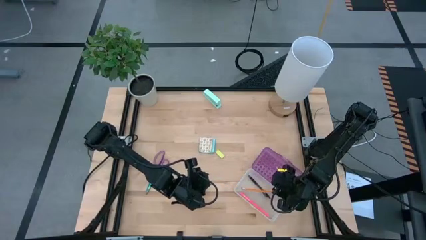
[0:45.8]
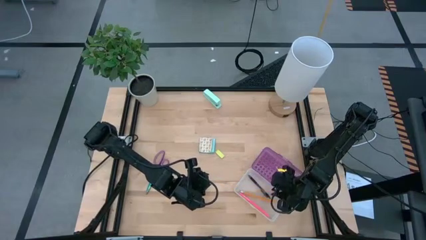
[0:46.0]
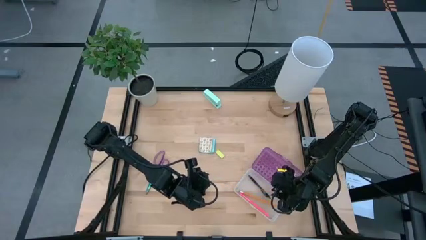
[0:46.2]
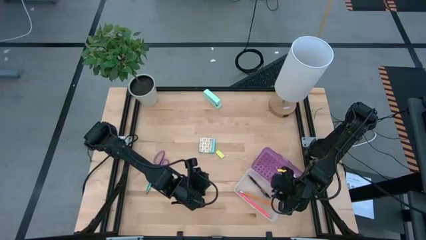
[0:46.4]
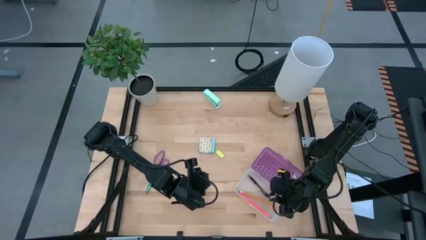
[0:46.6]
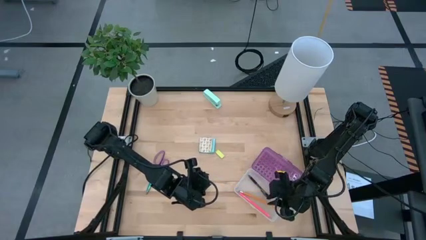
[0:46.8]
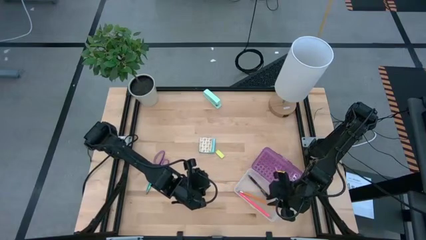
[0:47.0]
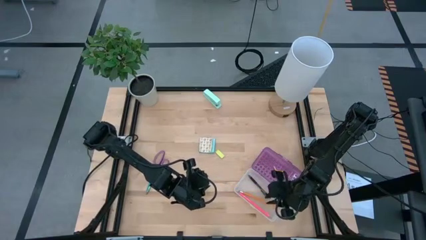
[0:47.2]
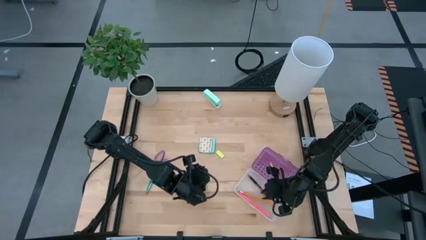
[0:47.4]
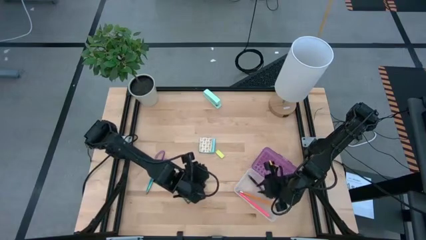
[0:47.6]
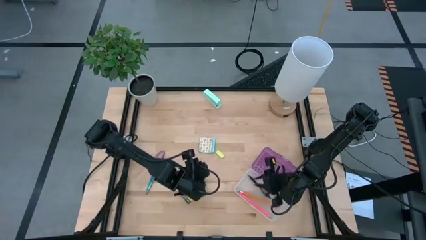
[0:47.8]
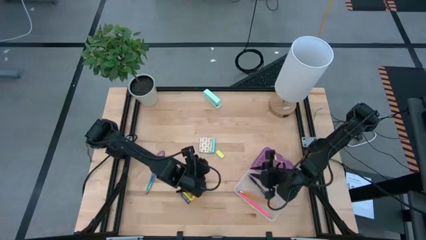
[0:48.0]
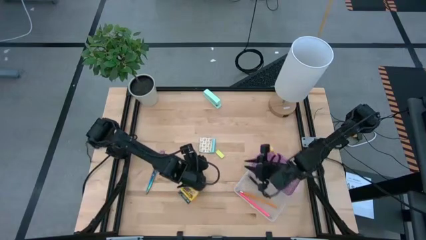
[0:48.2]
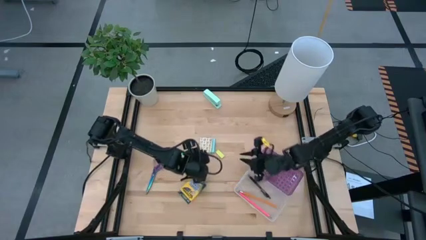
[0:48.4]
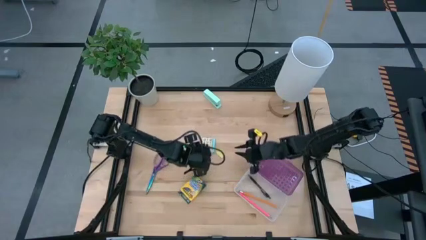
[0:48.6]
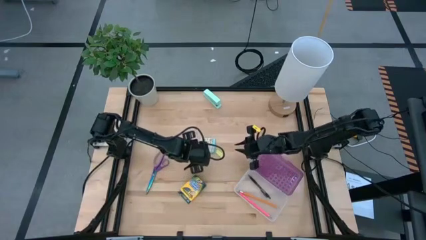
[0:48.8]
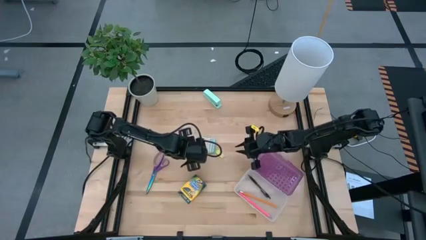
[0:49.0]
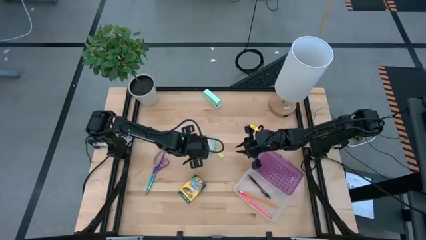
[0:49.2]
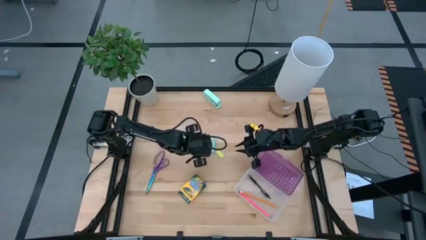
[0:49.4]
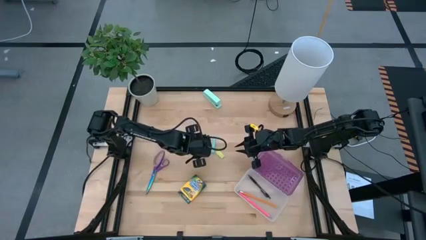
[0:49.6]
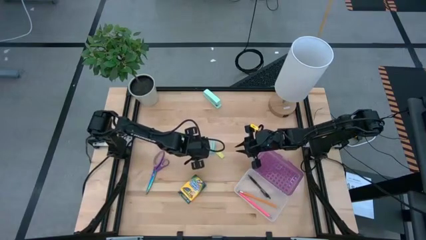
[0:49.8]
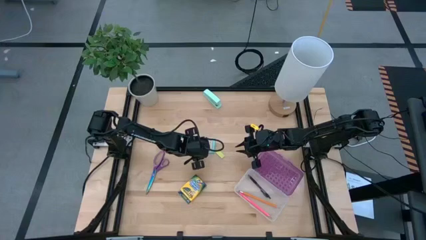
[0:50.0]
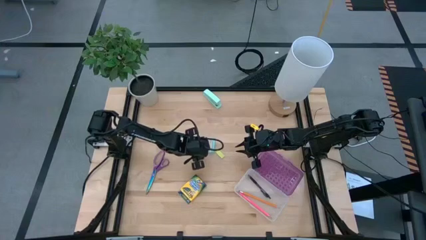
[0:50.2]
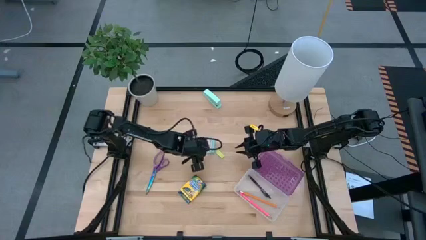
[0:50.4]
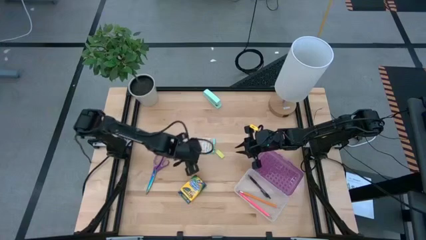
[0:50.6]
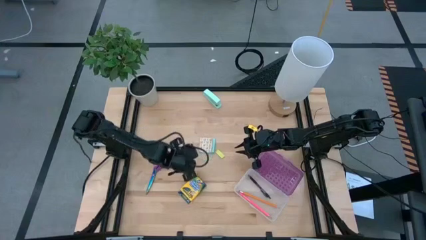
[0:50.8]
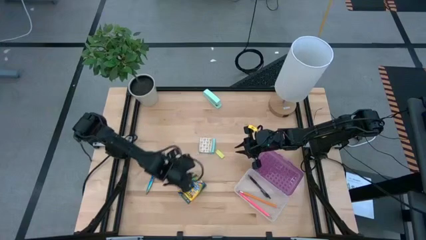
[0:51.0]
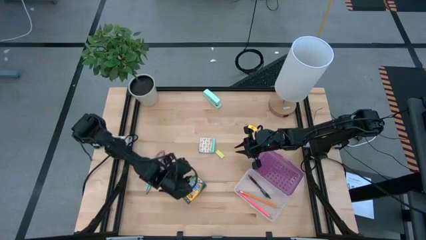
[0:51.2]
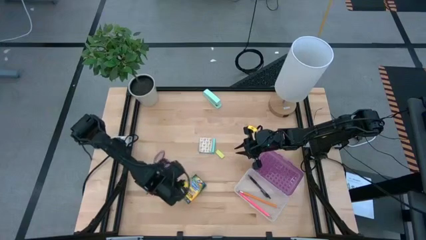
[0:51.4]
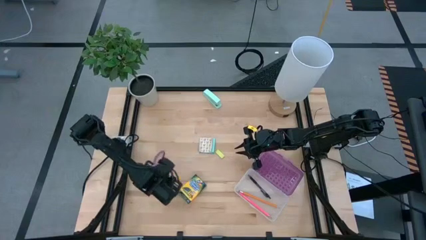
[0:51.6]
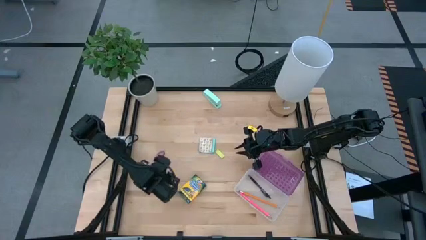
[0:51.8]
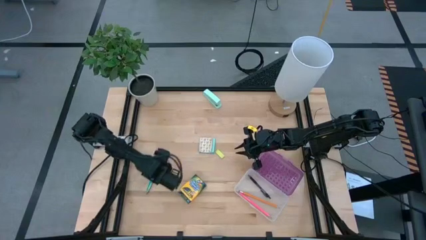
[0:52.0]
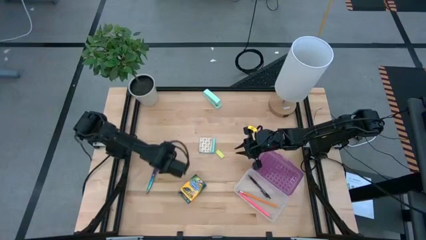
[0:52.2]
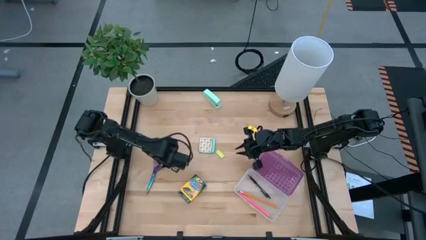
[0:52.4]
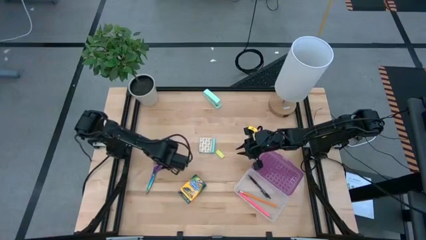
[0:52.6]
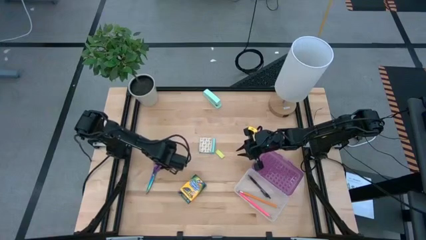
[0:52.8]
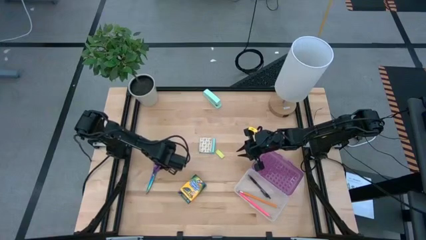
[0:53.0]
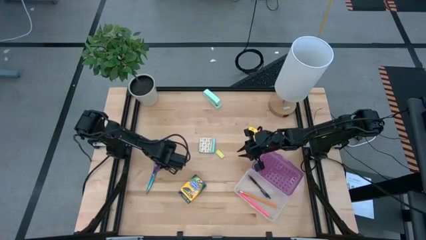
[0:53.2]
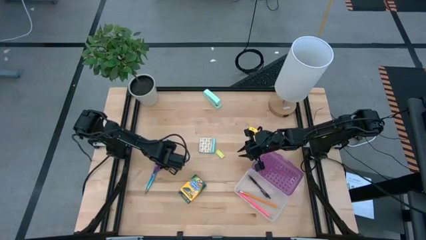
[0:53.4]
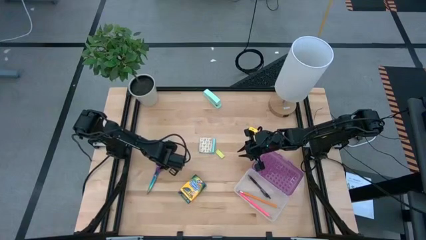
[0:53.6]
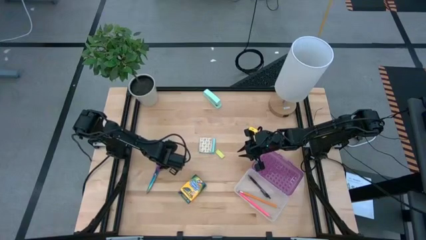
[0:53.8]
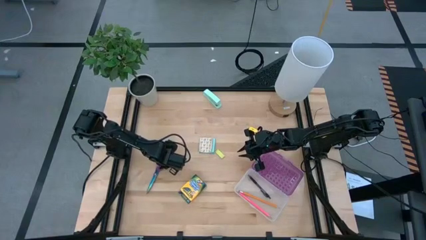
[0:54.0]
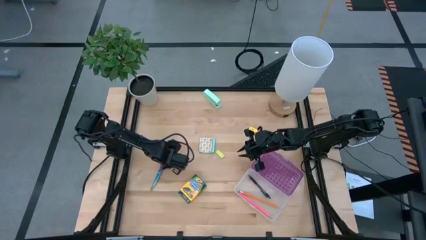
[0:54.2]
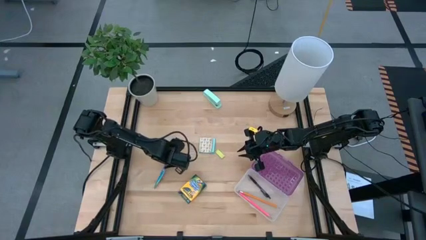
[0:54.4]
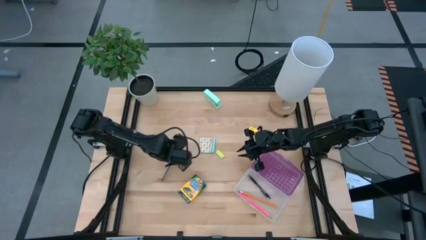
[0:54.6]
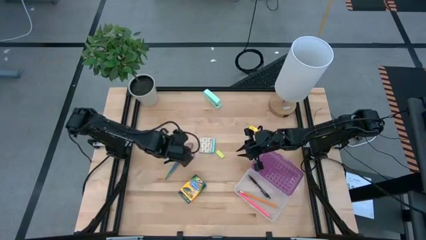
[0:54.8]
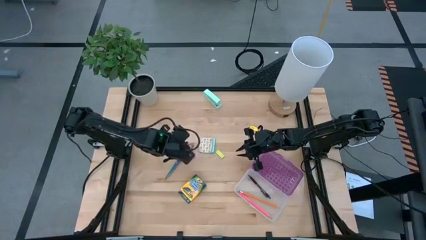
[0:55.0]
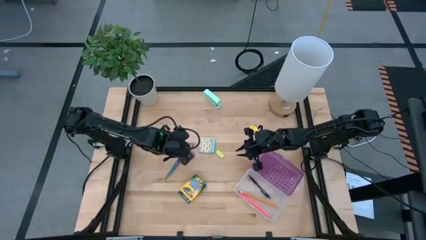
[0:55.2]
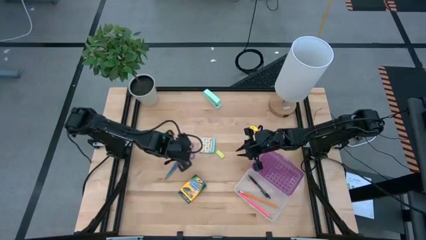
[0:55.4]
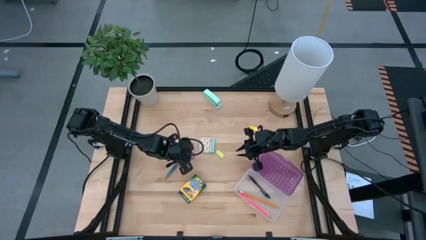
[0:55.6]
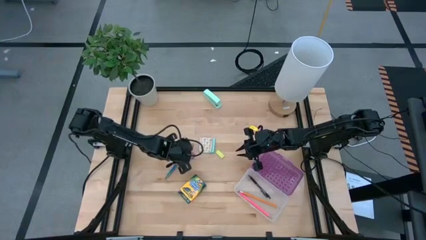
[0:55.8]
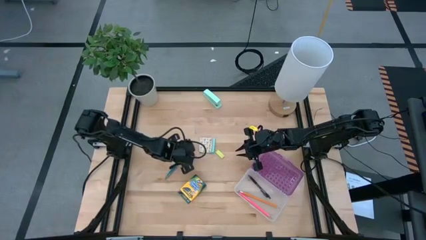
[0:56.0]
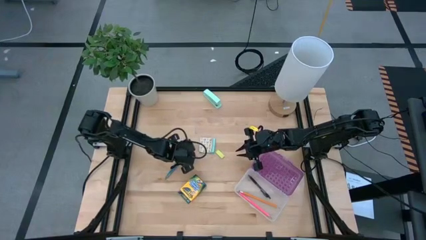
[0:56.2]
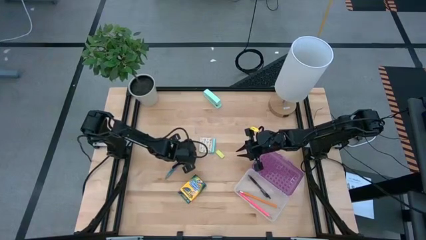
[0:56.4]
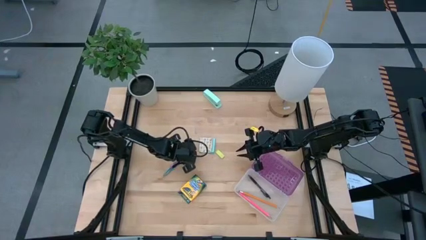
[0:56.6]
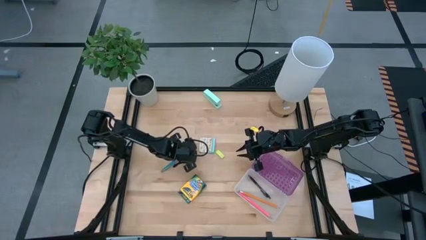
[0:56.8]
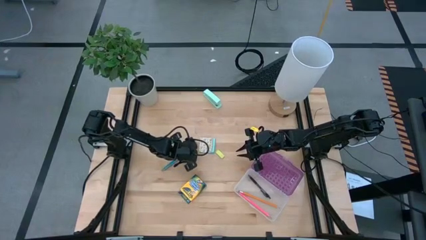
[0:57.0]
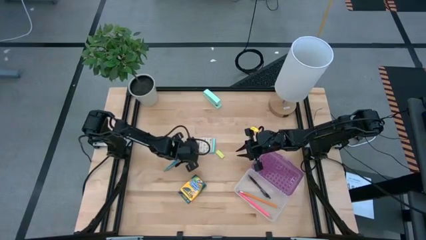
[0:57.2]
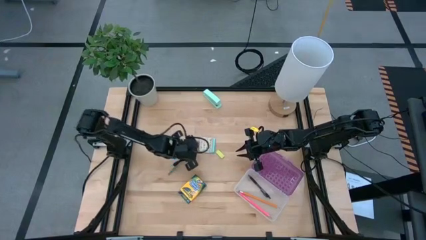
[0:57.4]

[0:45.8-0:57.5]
Task: Pack school essentials
Put the violet scissors into the violet supply box
